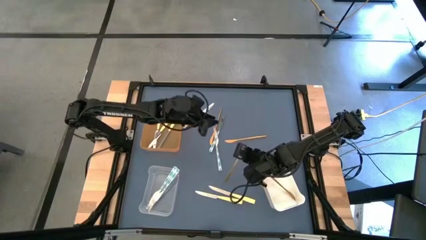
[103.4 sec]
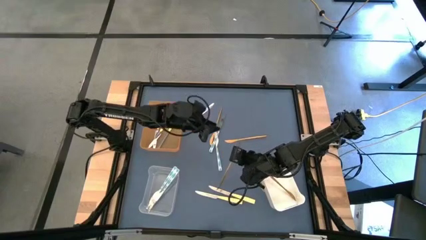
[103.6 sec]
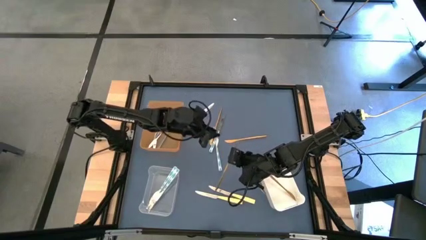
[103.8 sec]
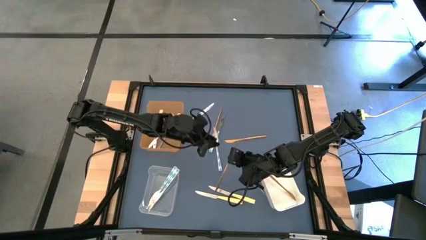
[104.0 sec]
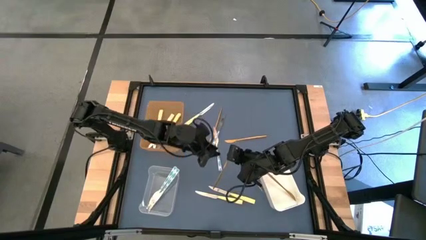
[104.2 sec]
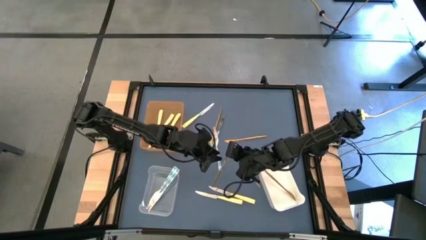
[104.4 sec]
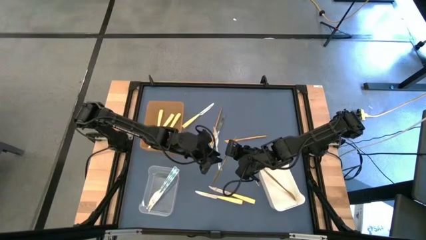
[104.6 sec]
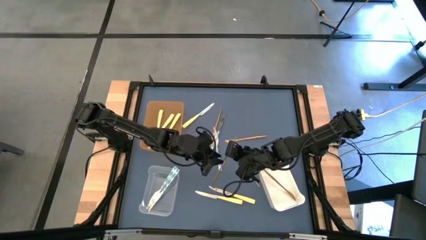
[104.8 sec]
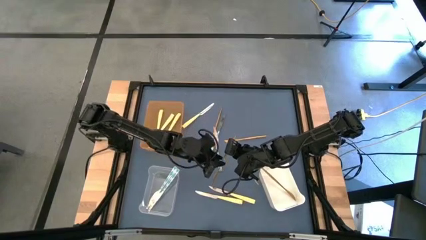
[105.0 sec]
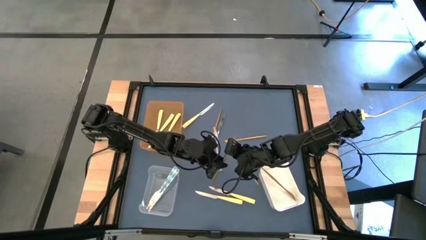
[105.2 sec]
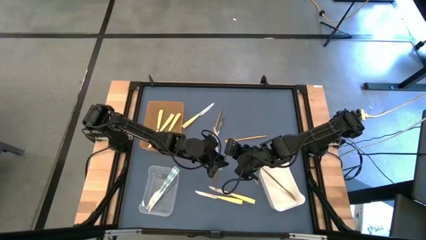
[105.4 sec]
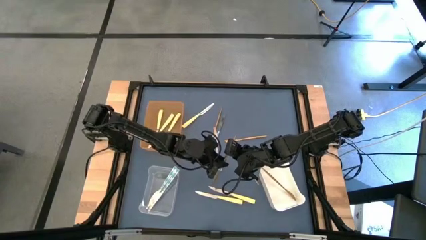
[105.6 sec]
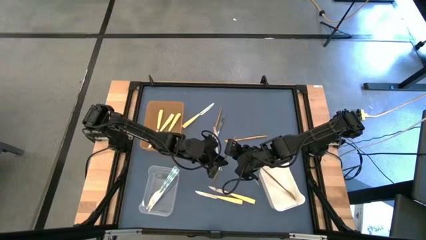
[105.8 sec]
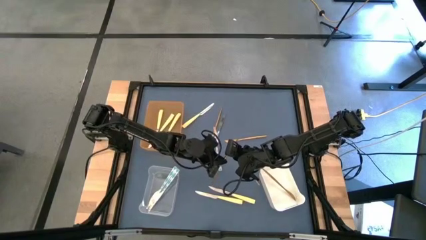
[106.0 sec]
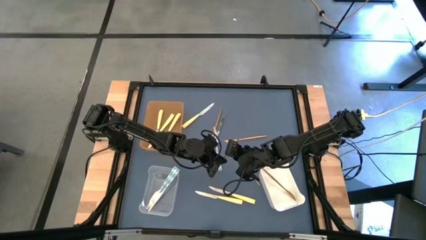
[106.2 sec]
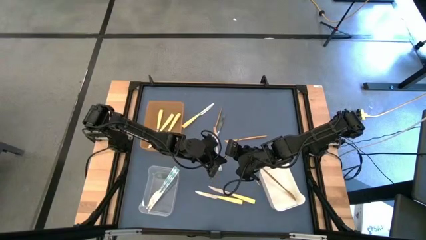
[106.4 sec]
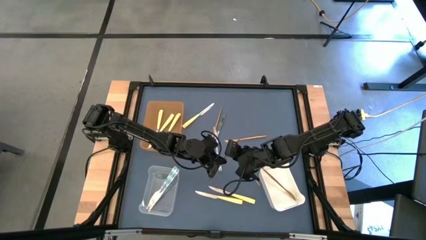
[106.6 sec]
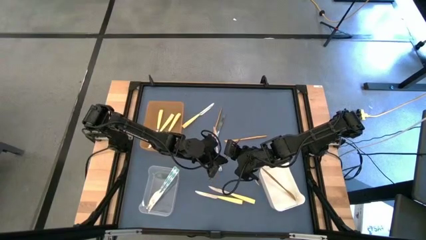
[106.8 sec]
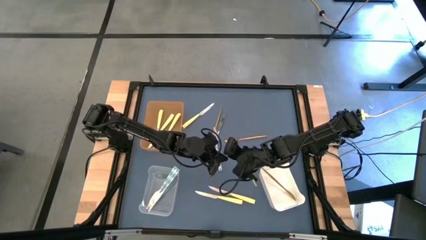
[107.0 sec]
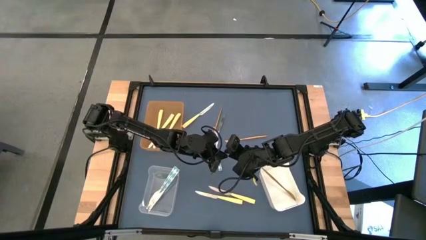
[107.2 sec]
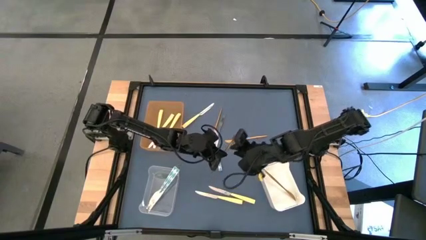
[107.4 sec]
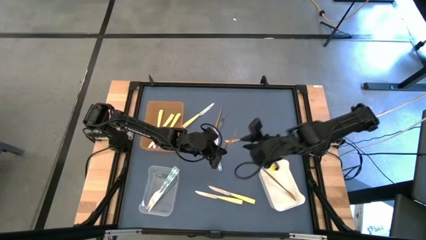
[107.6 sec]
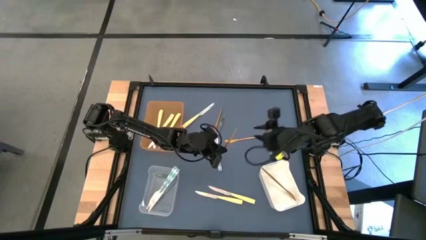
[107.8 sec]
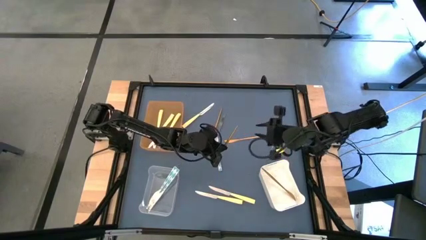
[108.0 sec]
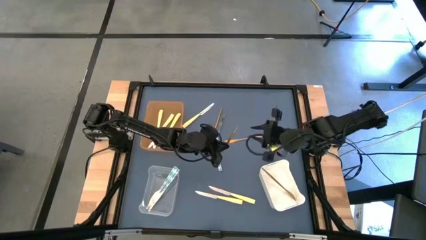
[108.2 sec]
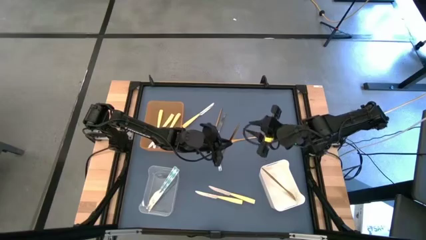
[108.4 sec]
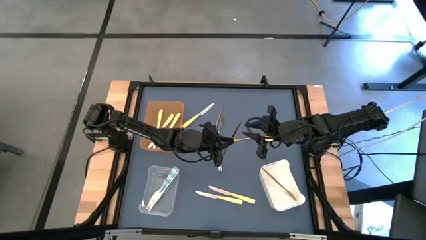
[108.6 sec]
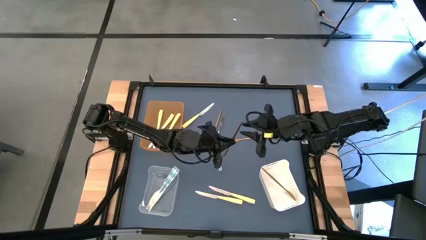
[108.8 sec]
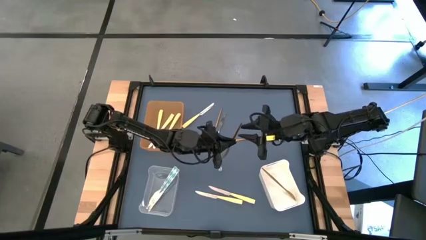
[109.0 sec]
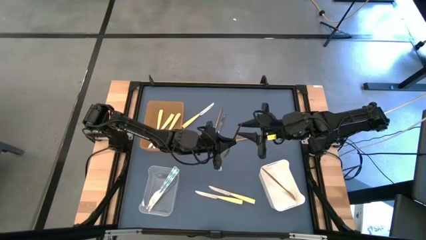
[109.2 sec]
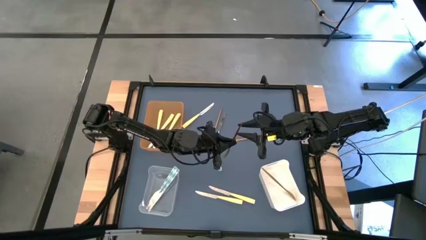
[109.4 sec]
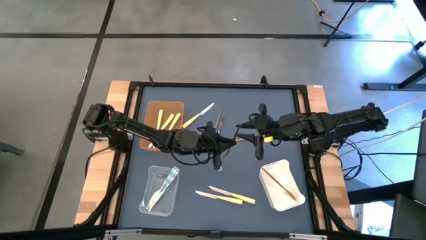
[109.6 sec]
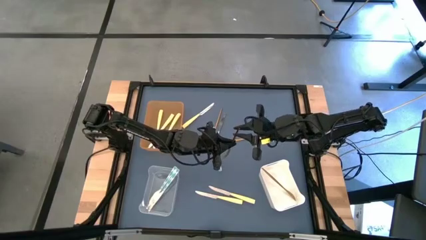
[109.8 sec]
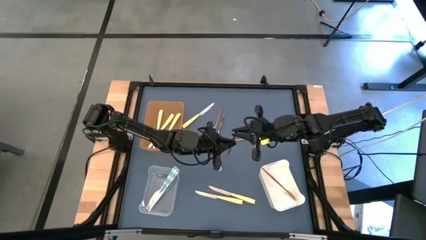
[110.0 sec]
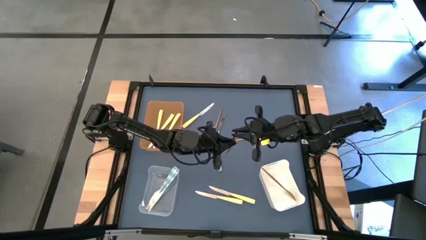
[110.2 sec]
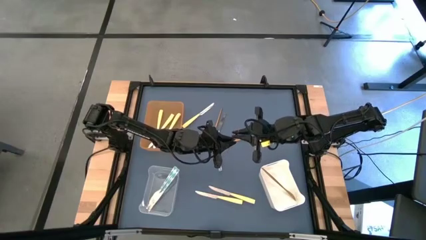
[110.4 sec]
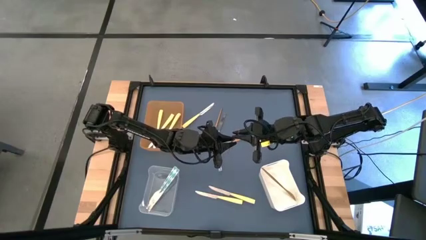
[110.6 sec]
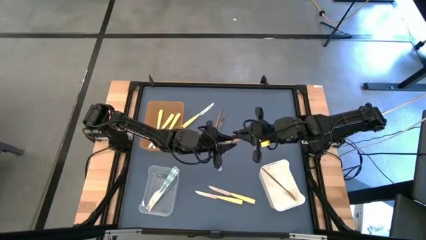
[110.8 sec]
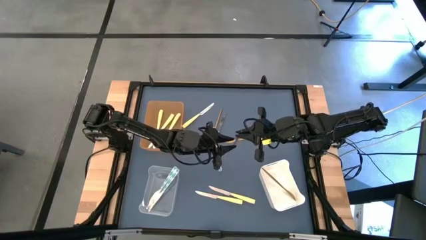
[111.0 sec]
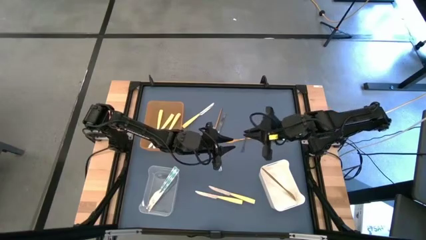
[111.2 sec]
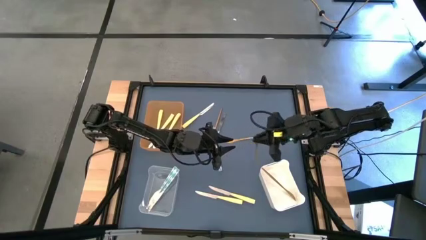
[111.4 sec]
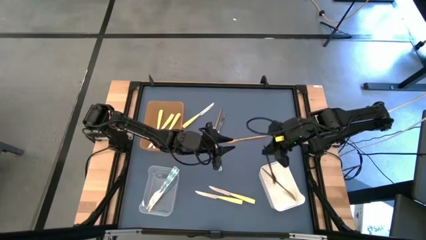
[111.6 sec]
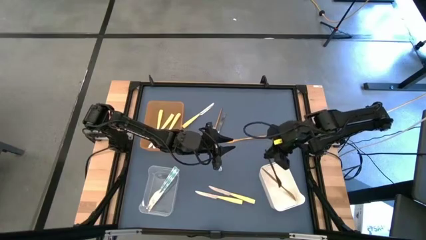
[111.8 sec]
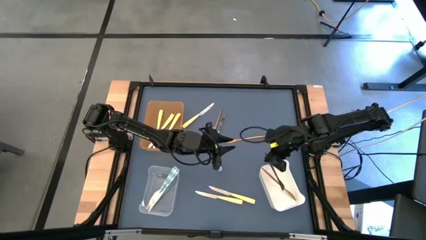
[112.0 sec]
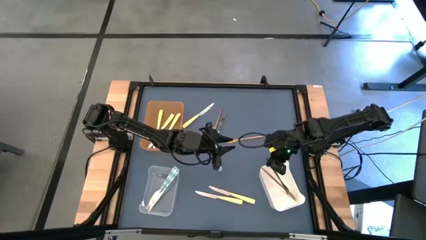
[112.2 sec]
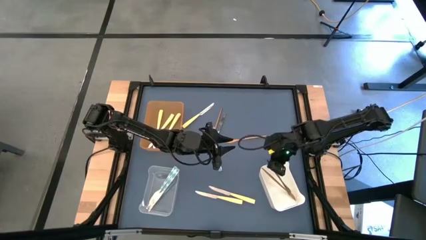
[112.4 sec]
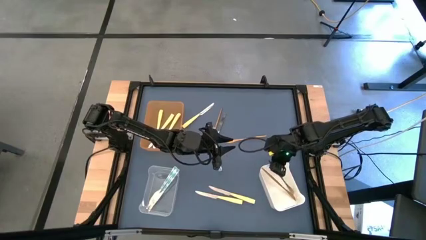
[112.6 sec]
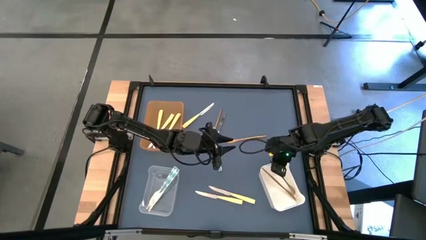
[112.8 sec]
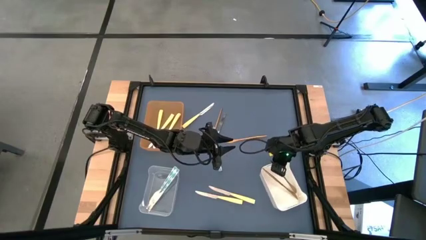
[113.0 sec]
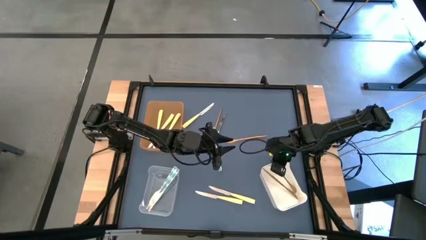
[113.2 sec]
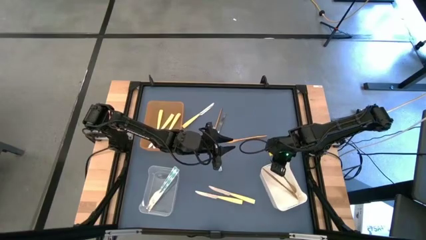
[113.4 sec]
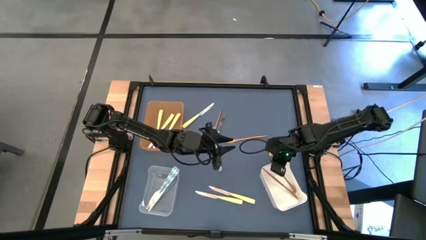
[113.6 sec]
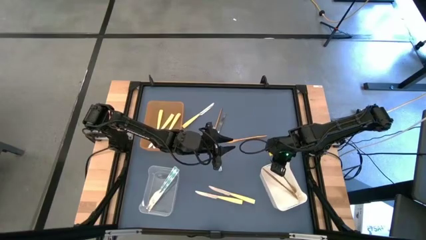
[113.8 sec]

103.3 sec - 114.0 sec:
Task: Sort silverware by color (type)
Put the gold knife into the white bin

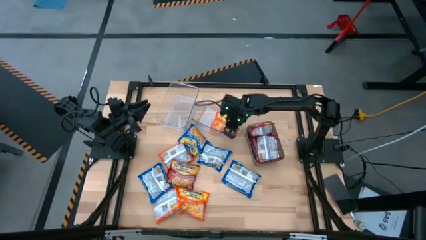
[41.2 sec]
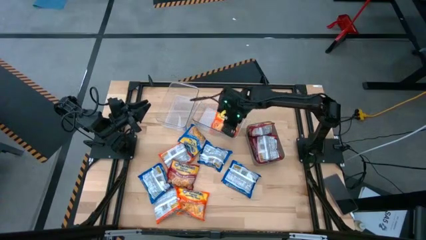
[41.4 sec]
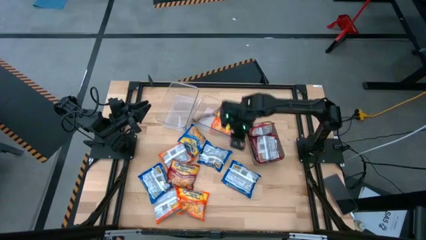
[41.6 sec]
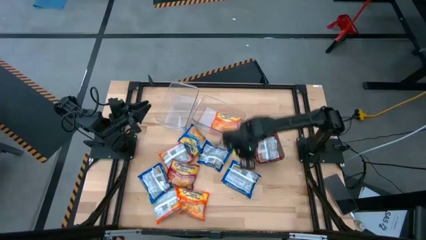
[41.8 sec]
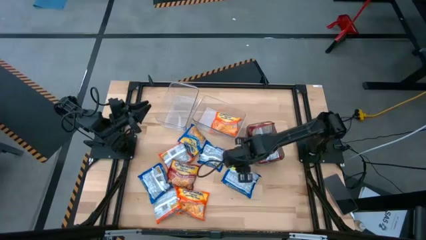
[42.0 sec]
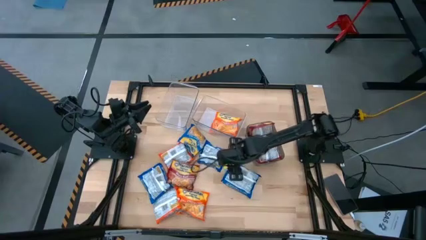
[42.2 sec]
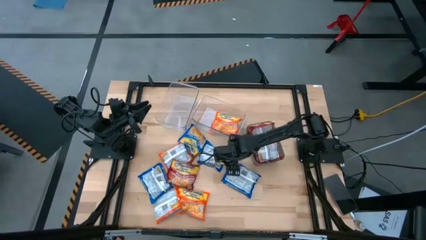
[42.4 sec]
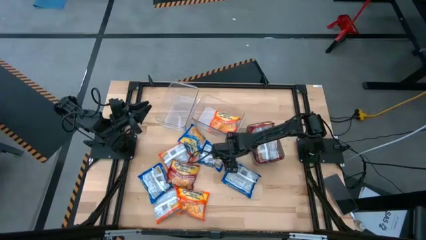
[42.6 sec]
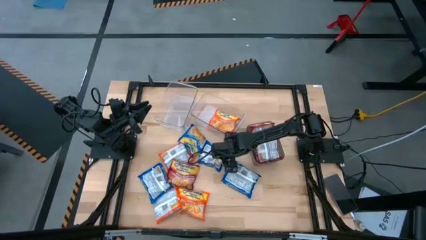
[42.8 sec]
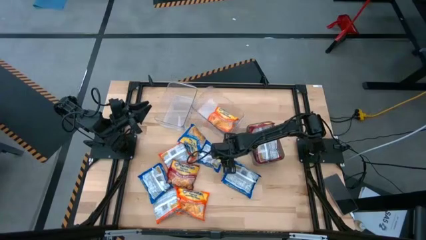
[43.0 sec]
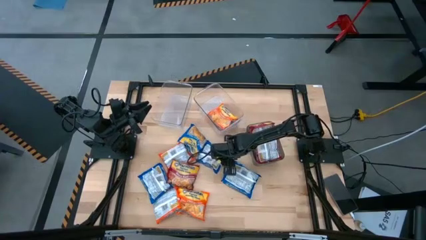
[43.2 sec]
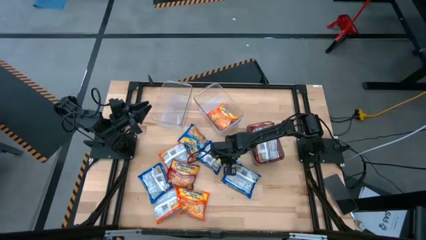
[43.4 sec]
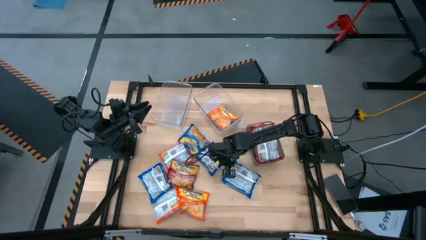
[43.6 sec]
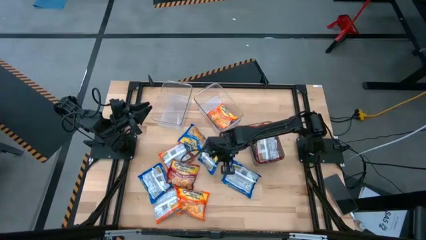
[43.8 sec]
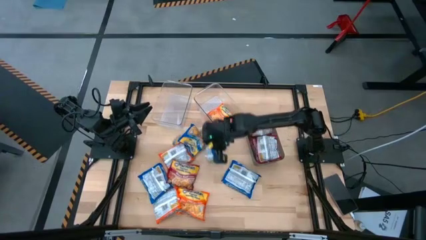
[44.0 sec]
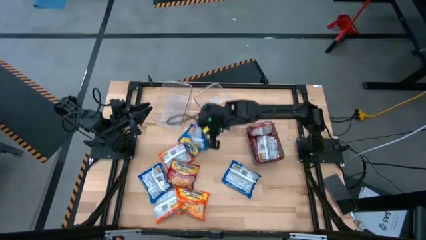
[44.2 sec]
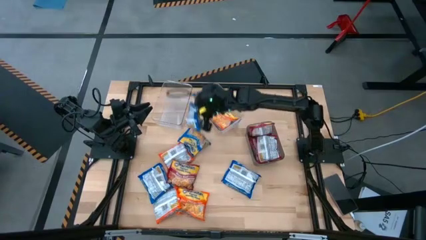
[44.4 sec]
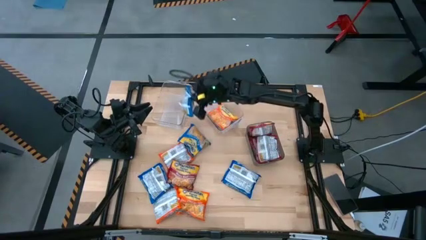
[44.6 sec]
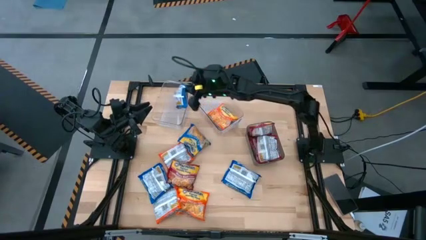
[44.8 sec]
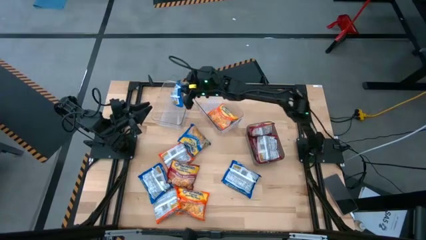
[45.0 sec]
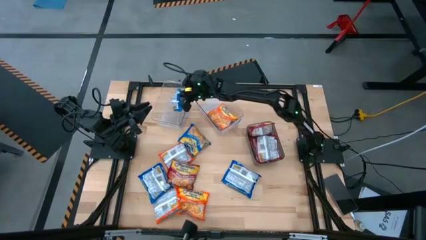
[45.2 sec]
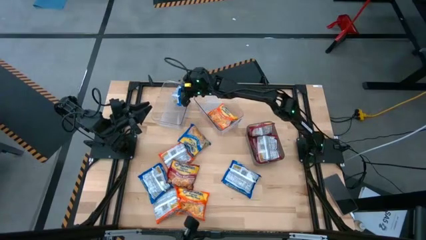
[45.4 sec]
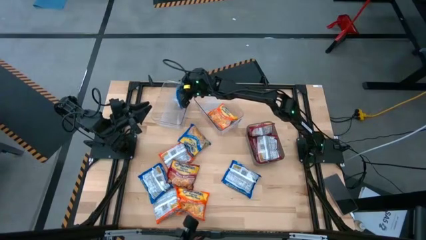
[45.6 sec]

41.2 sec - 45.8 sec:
Task: Sort Maruchan noodles
Put the blue noodle pack into the left transparent bin
